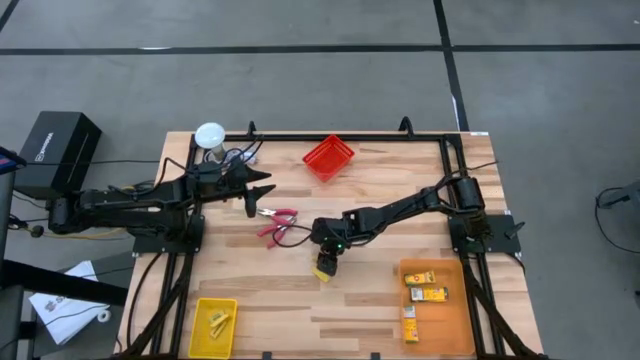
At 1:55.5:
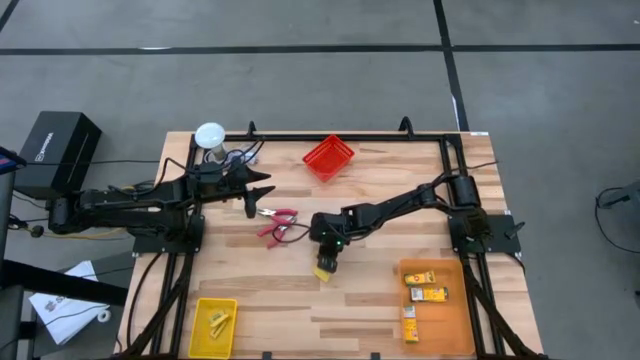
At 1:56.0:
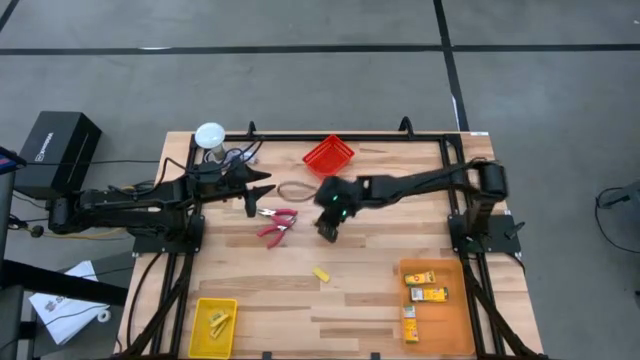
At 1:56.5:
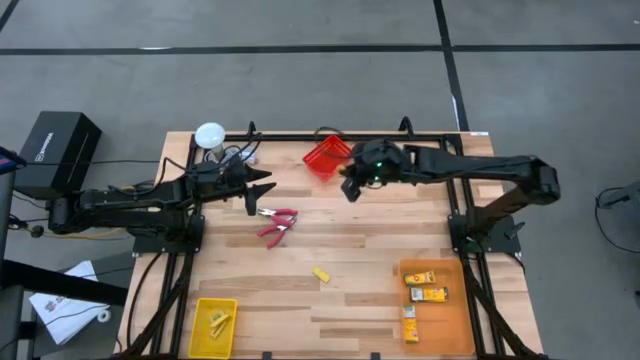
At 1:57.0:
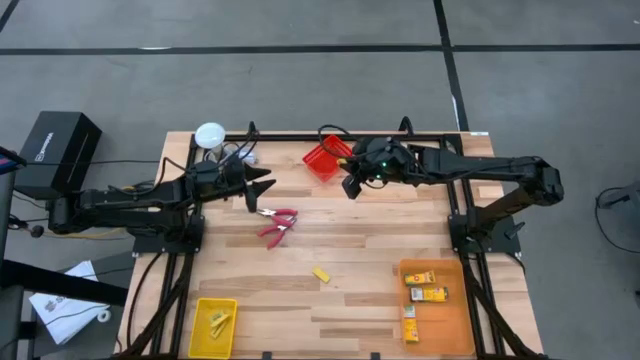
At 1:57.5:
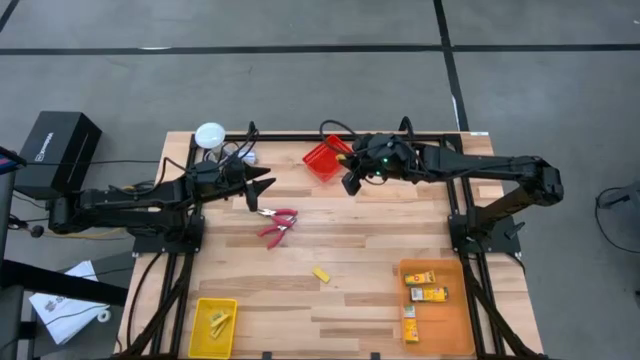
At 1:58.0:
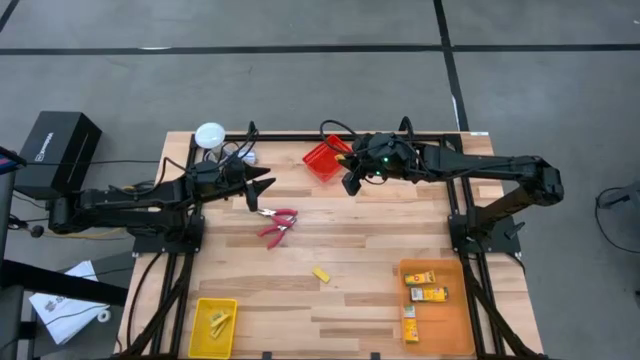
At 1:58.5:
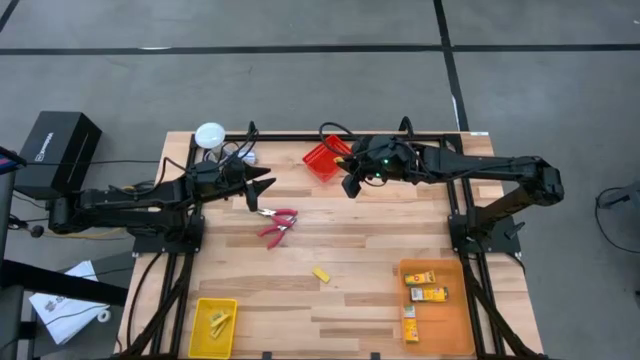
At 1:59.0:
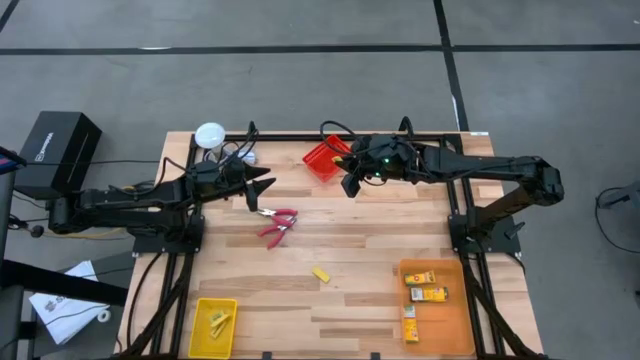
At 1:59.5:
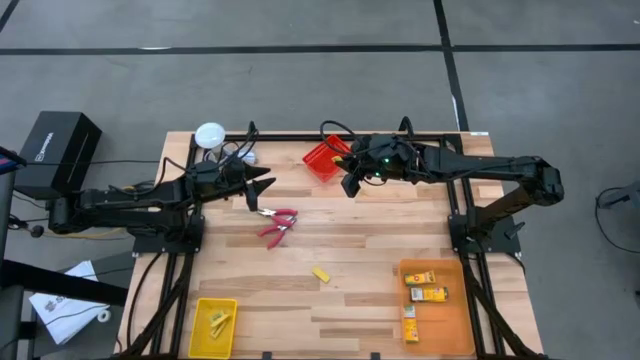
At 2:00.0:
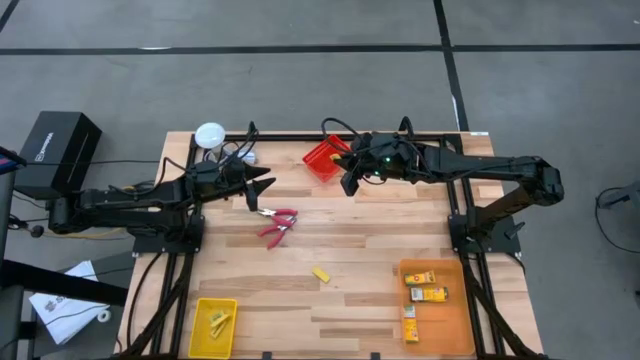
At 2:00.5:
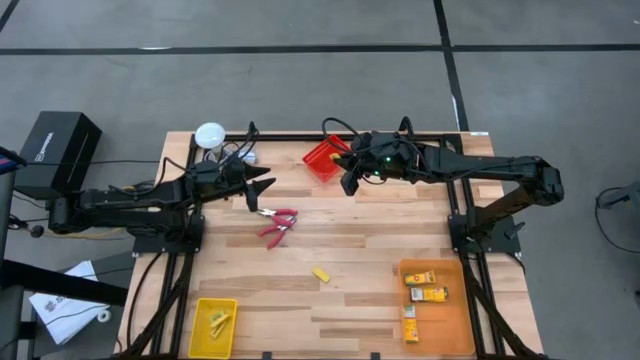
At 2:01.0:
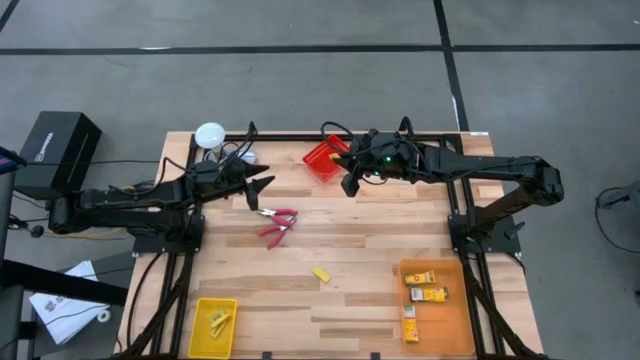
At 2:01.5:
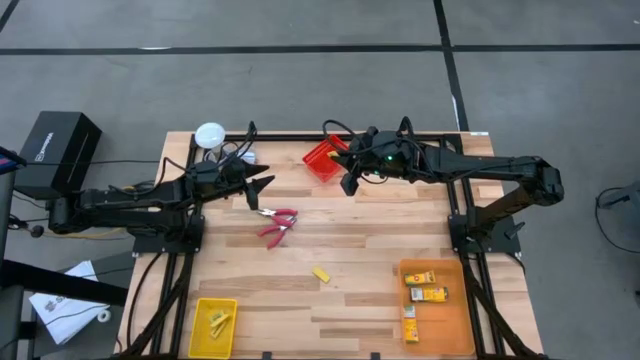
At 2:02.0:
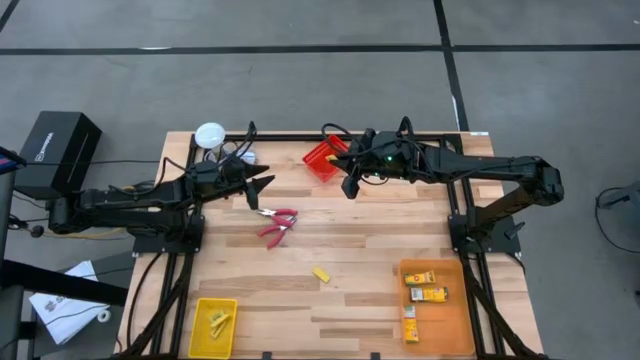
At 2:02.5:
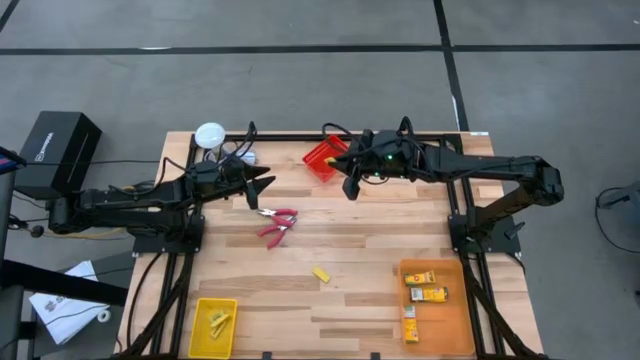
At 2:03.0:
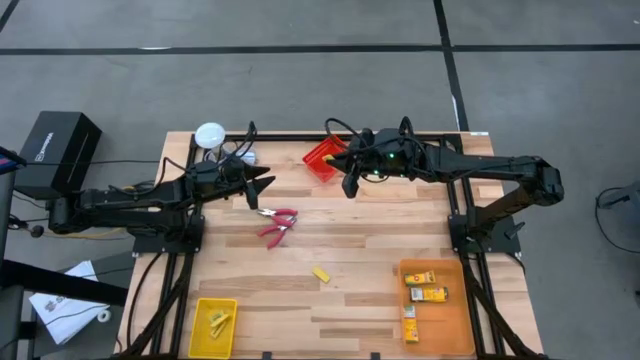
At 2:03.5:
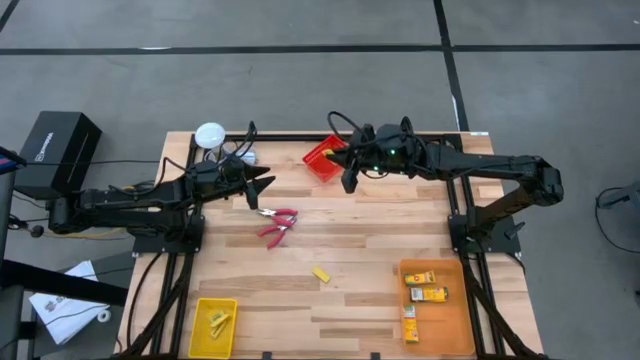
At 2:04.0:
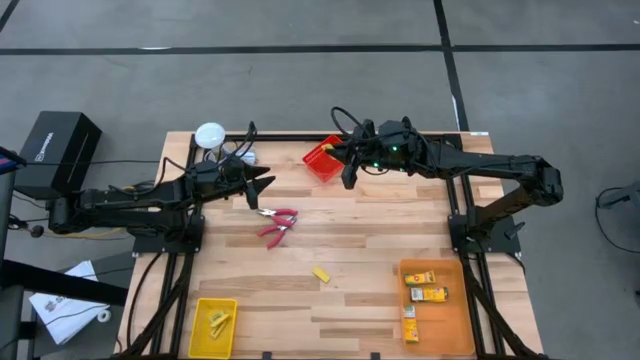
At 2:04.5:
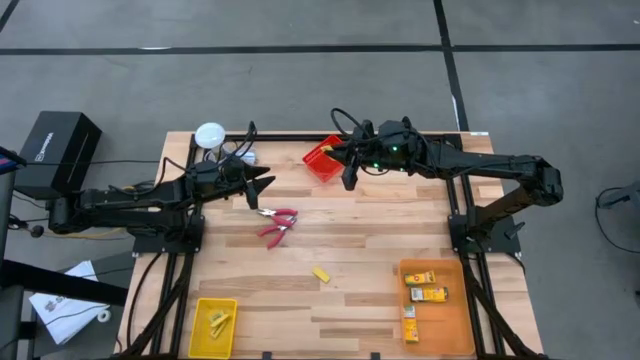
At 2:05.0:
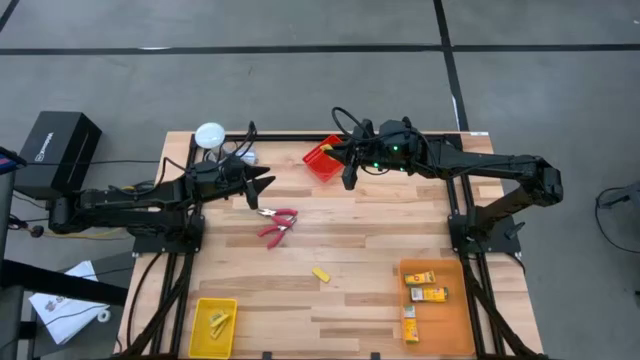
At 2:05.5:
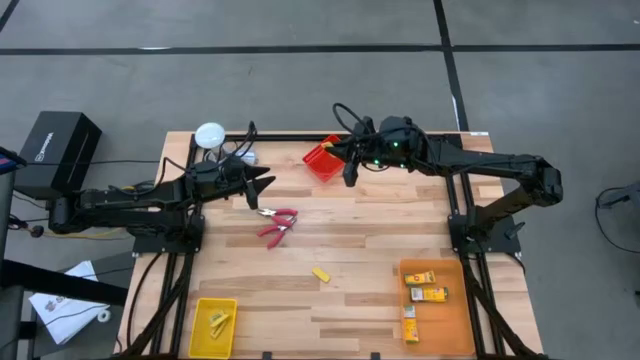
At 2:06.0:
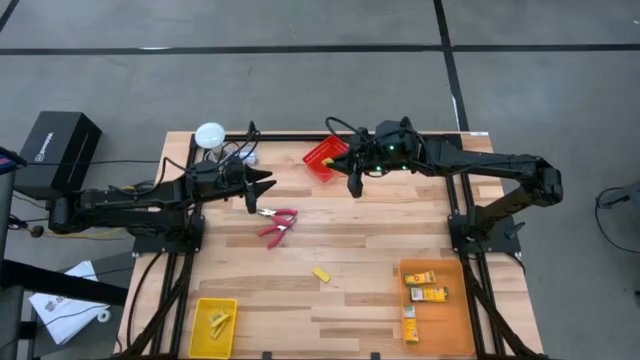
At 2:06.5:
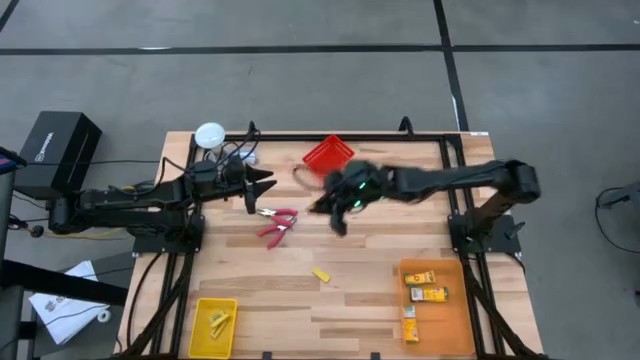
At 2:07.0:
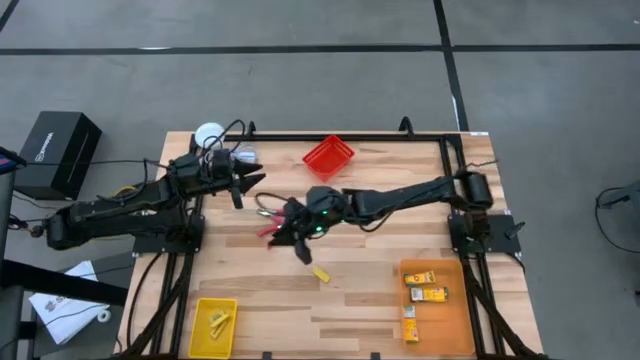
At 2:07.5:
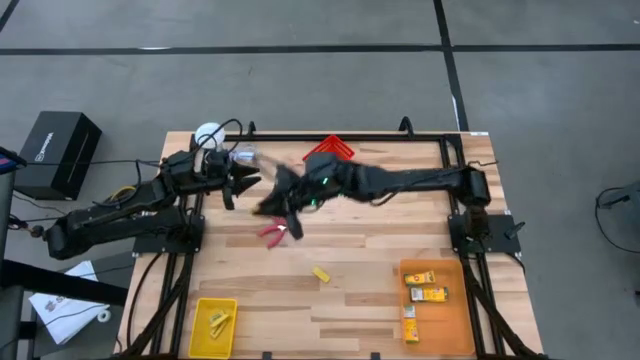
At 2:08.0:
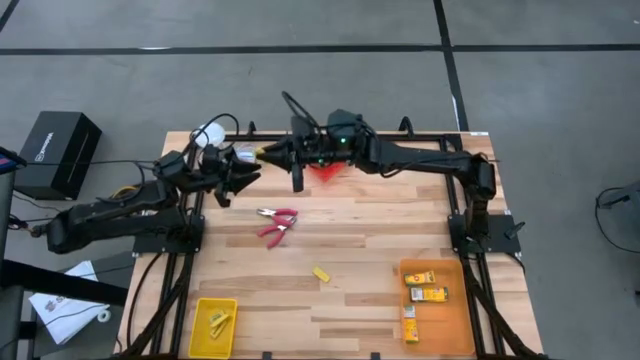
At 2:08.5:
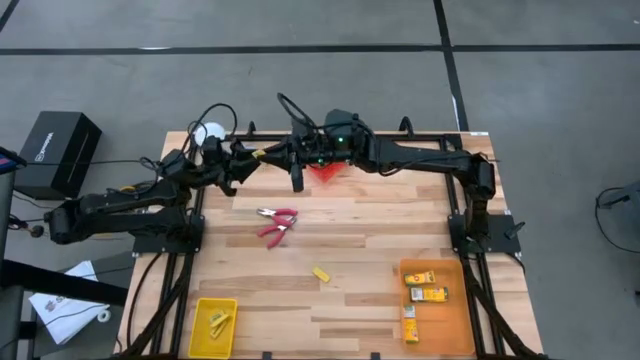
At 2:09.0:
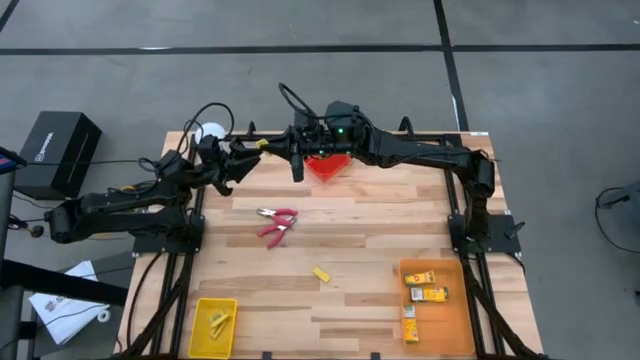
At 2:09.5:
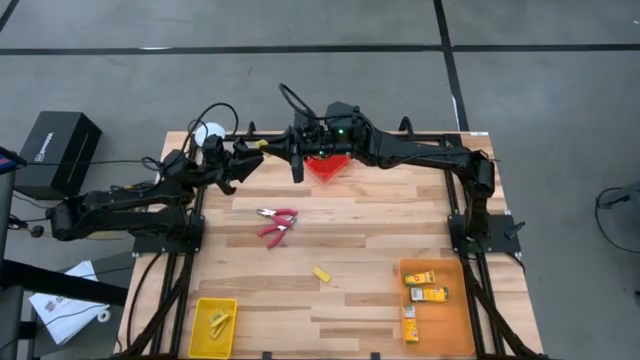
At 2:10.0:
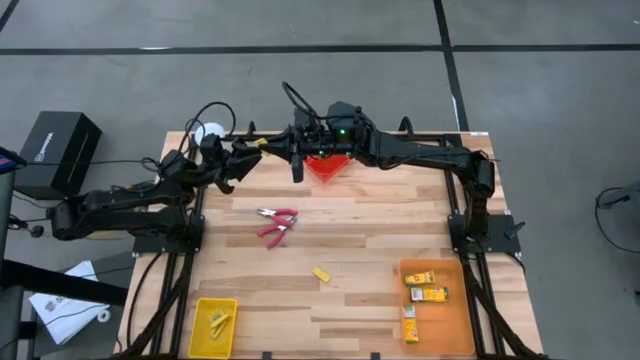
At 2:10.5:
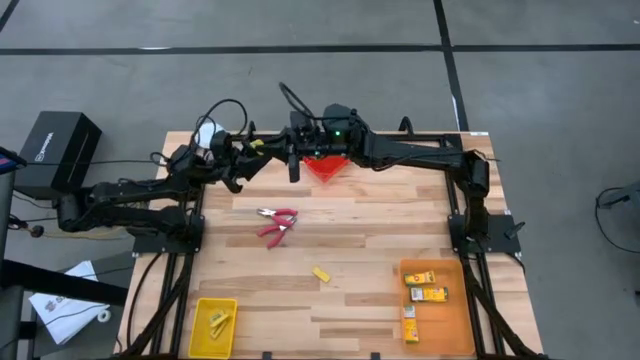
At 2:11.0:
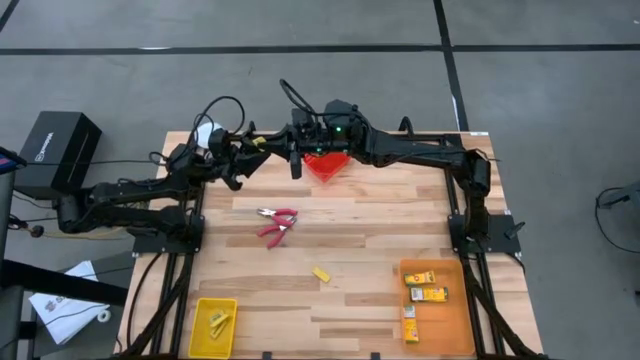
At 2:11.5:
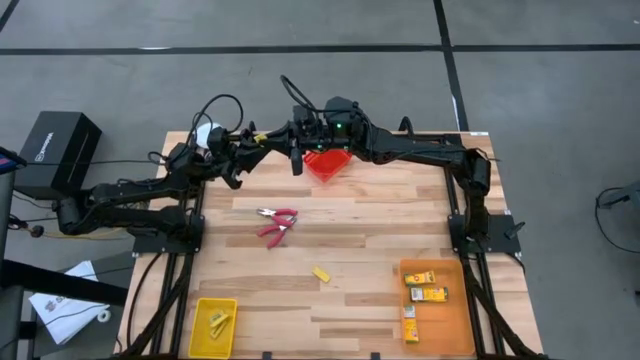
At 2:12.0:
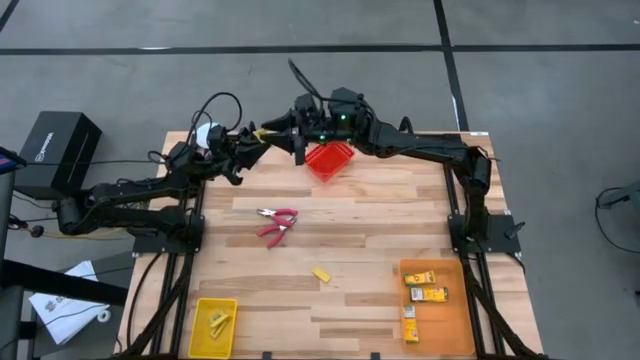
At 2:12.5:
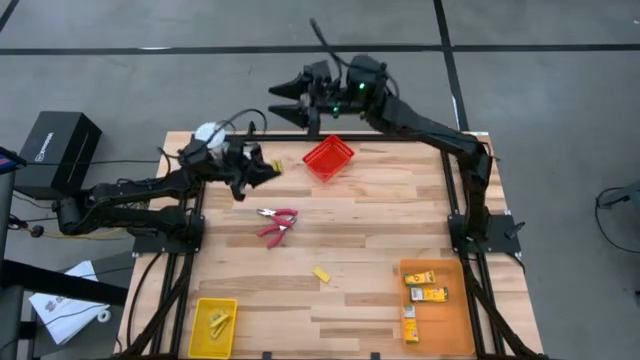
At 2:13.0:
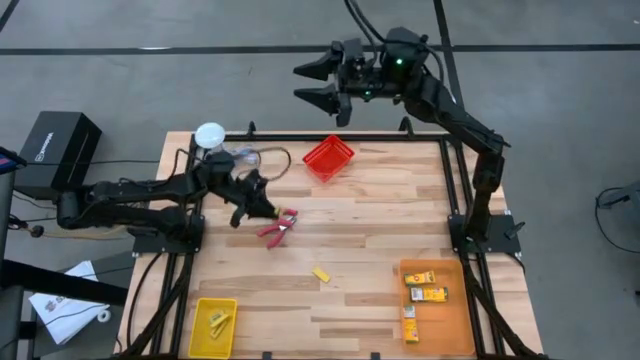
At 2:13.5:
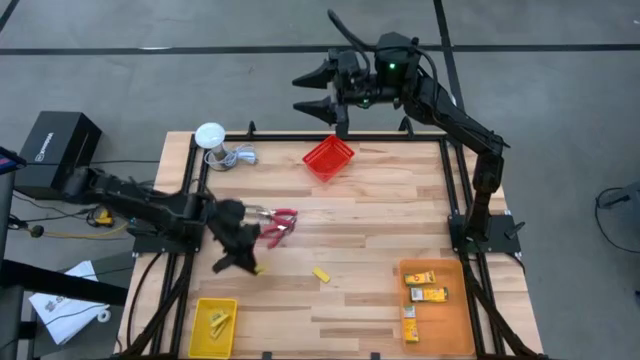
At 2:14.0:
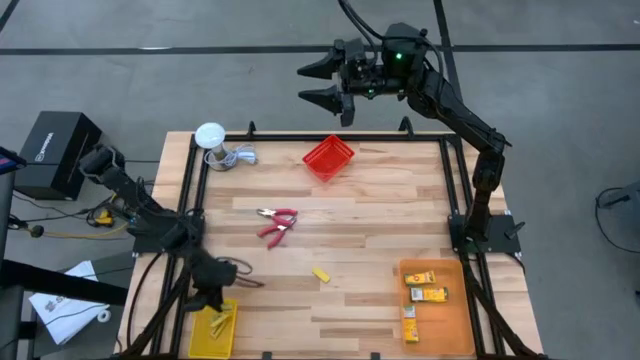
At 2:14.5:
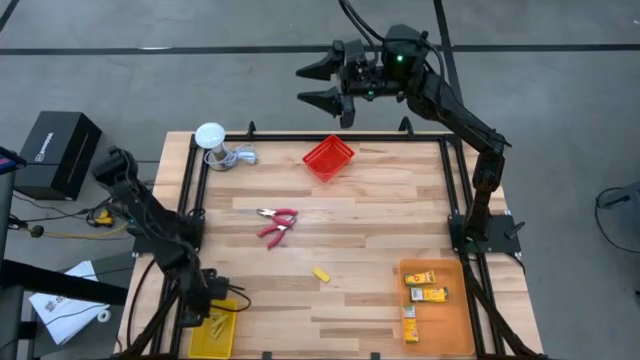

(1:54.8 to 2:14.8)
Task: Pick & Place School Supplies
Put the yellow eraser into the yellow bin
